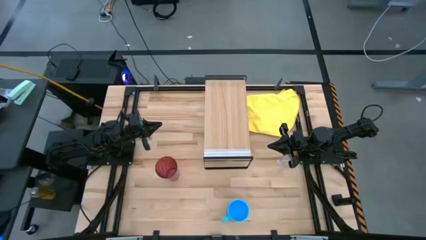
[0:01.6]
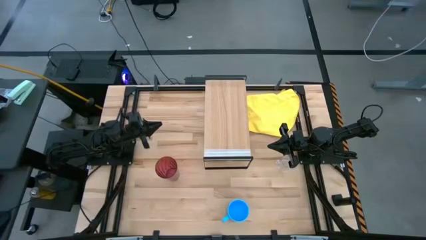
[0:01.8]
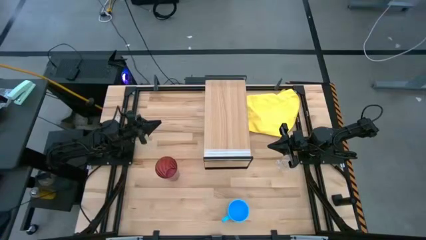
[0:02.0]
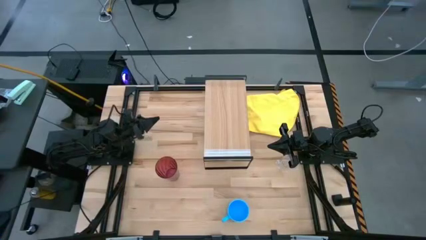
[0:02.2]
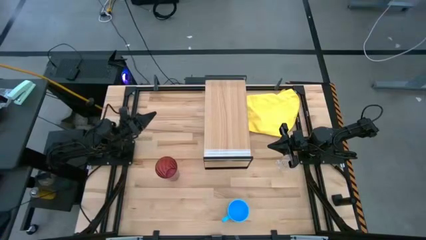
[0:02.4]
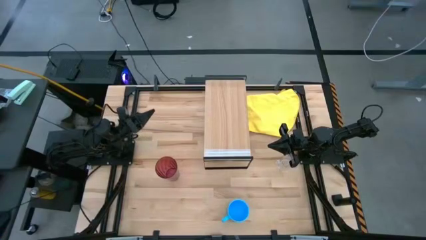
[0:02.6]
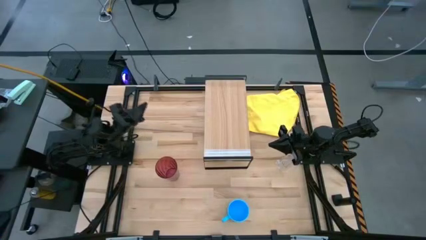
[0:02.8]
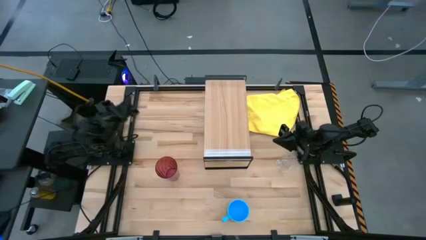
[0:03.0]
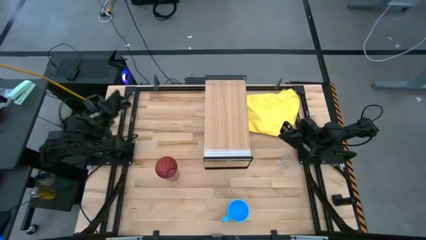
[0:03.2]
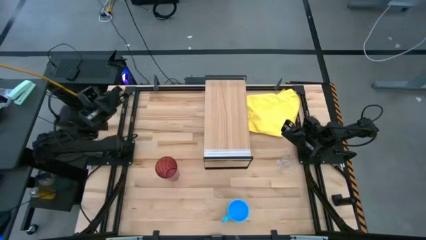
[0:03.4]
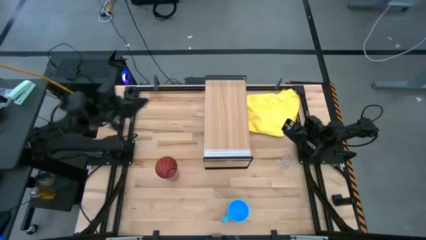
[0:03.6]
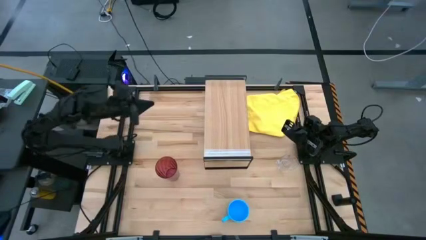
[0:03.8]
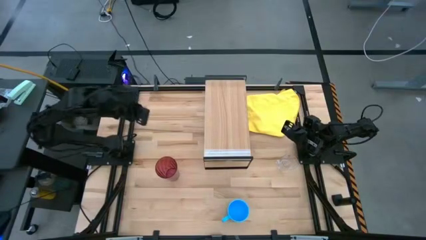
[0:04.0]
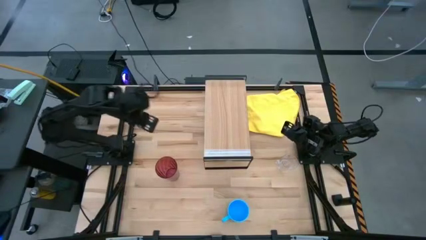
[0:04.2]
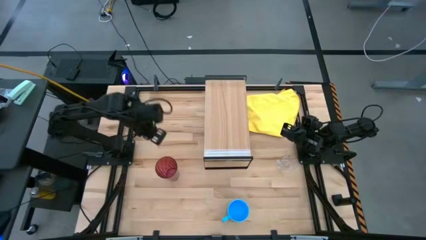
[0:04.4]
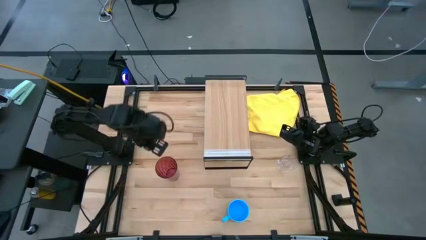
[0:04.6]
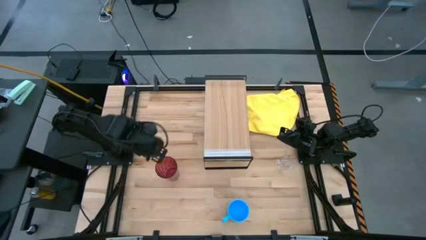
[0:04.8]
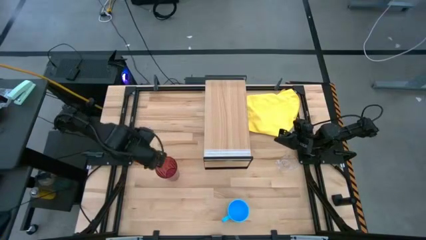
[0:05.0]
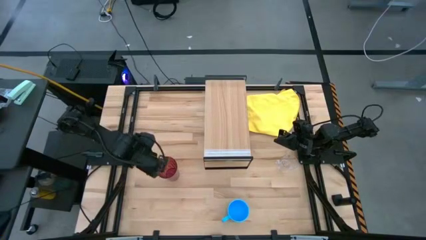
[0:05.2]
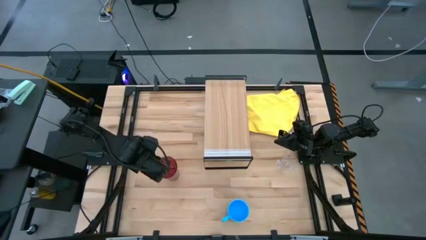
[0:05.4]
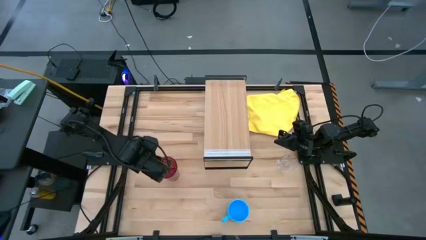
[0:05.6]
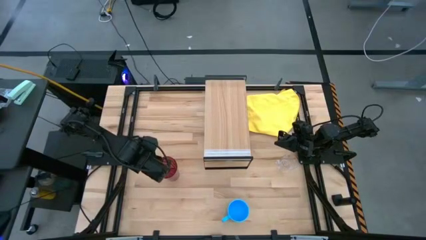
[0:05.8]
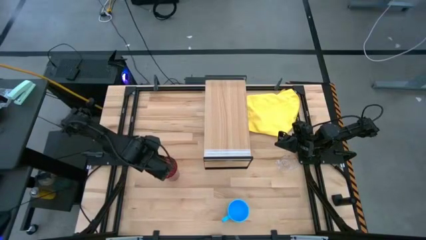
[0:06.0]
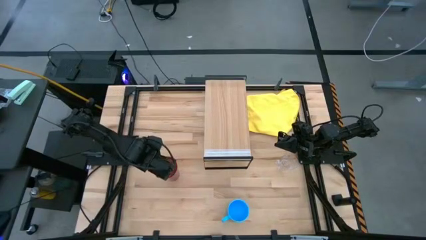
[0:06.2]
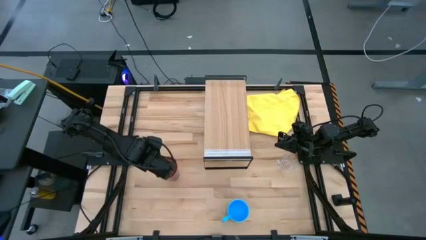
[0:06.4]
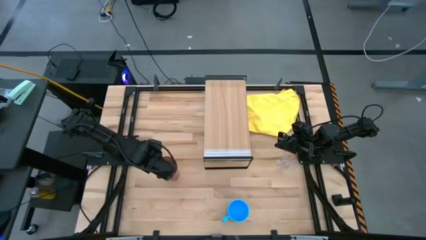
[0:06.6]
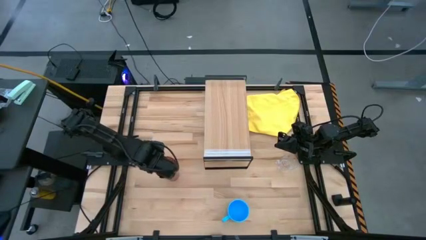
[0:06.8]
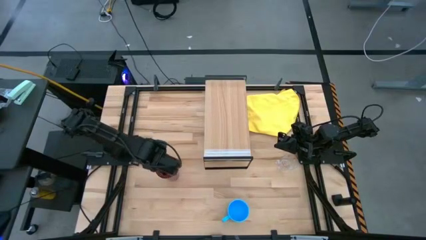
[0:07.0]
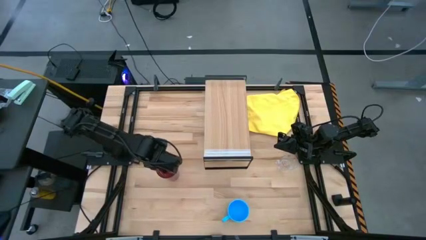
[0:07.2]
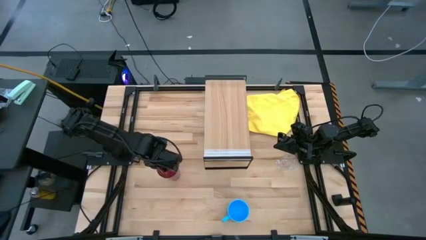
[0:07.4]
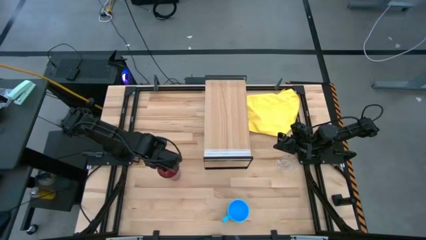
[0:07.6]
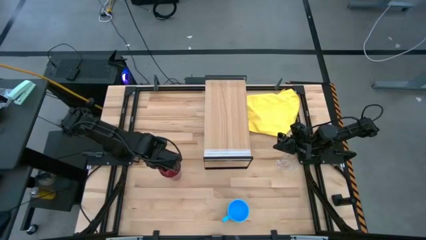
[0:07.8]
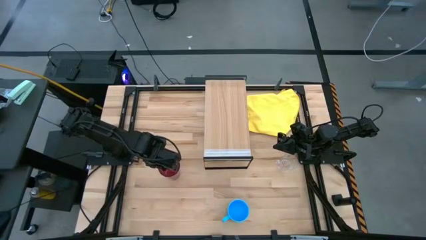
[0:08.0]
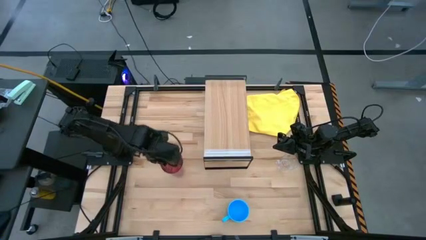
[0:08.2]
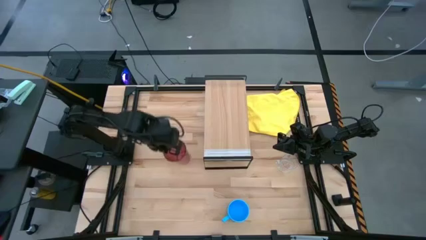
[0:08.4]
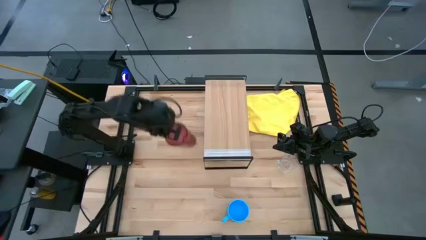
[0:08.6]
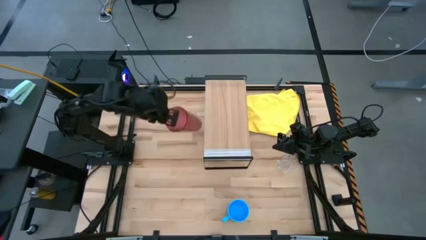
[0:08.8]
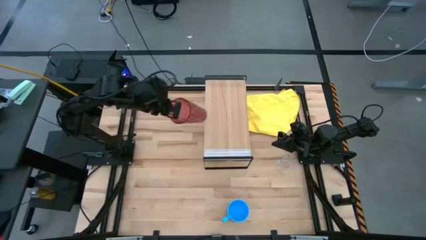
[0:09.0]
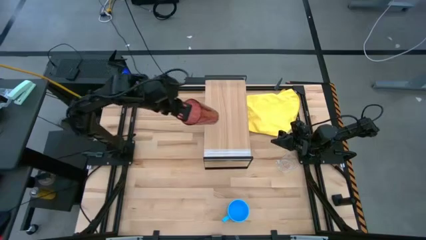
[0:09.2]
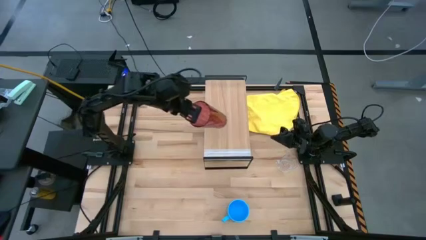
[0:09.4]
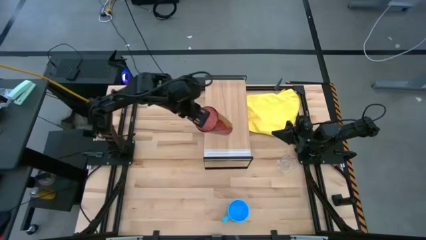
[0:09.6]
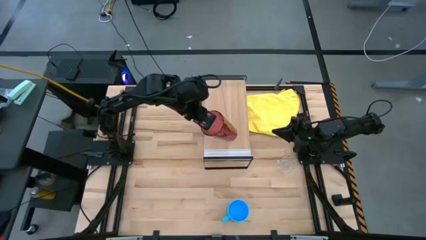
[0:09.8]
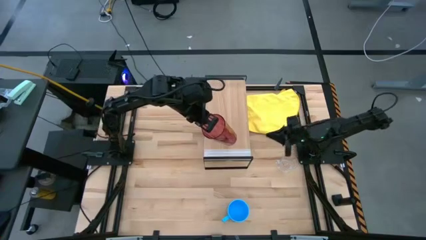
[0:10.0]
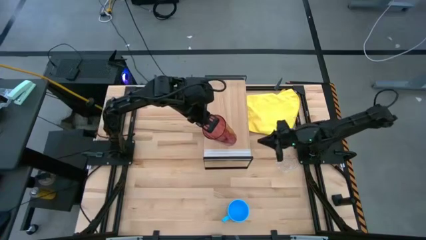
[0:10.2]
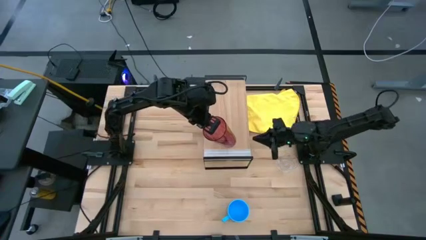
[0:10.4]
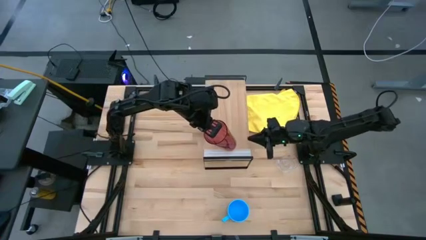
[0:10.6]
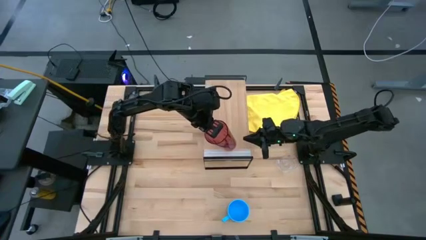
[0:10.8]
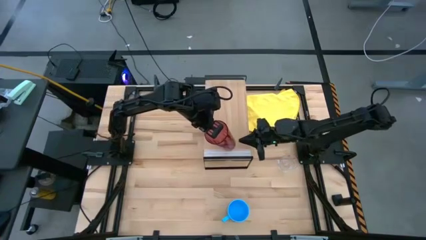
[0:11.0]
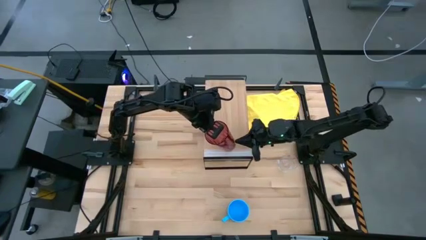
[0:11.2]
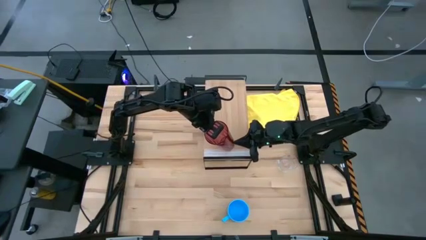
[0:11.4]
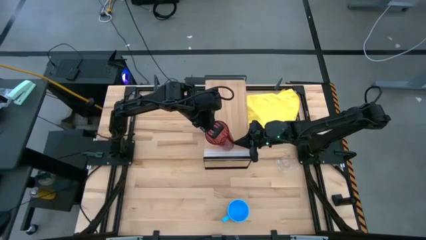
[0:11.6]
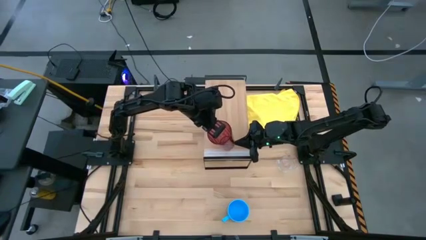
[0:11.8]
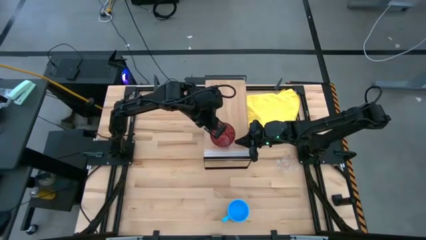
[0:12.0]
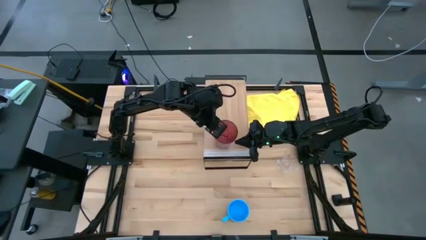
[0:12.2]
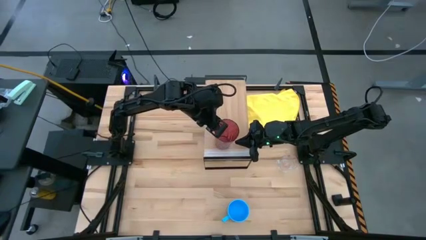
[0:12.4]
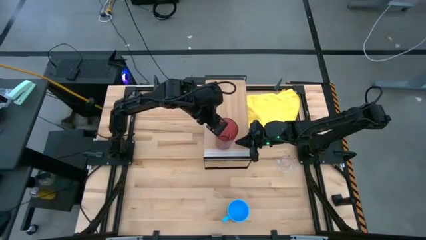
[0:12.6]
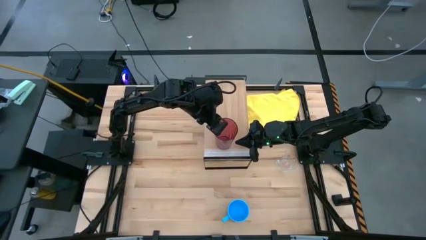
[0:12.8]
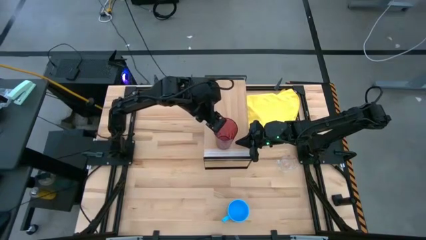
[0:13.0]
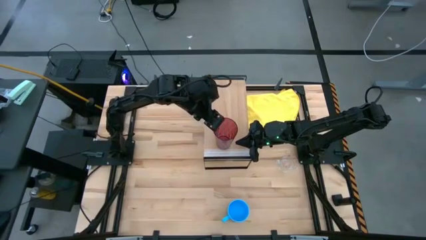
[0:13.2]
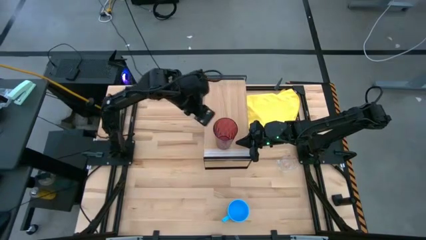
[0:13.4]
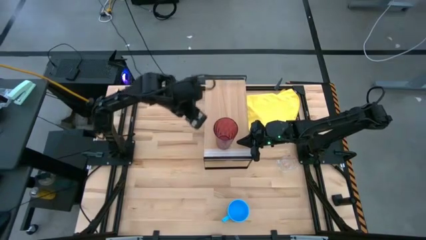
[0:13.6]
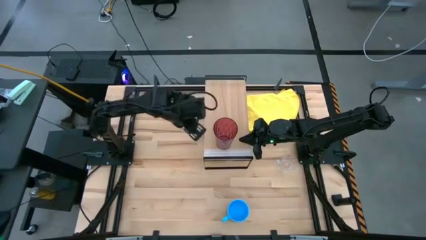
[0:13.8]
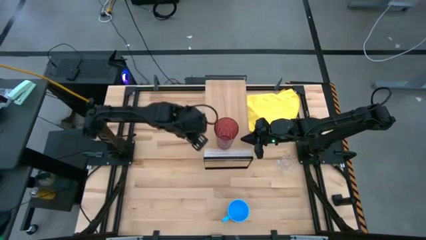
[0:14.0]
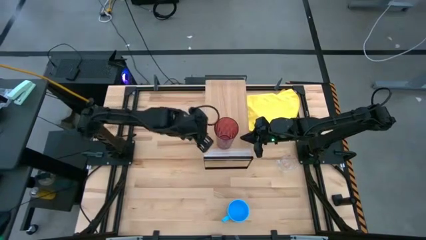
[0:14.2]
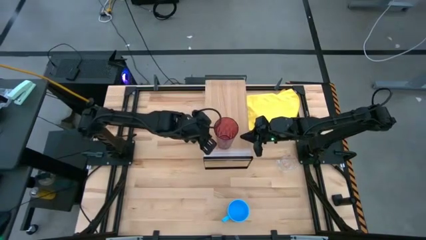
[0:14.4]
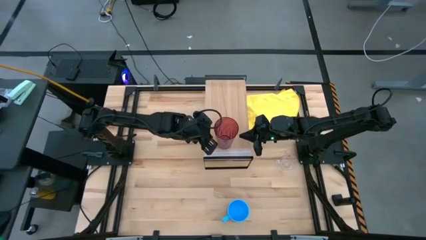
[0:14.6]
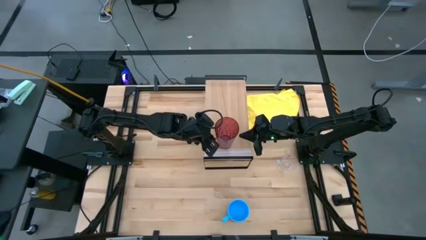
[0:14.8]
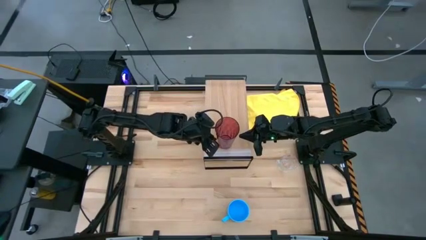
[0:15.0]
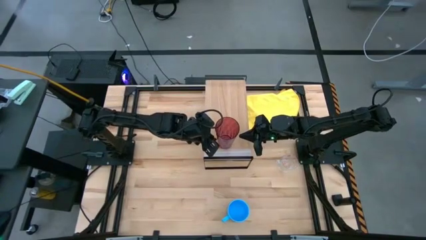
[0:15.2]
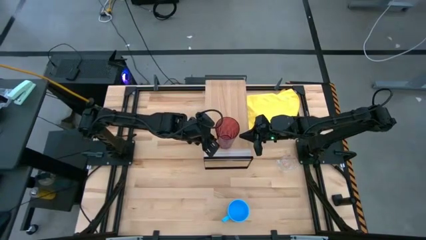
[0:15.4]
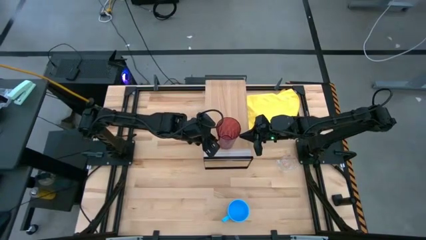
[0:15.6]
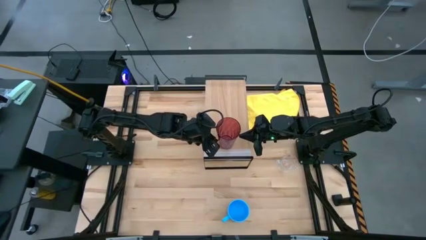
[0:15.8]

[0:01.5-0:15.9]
Task: Stack small to large cups/mugs on shelf
Put the red cup on the shelf

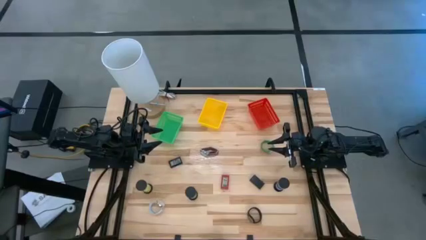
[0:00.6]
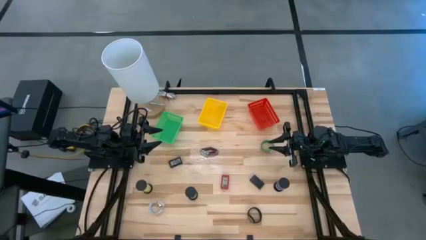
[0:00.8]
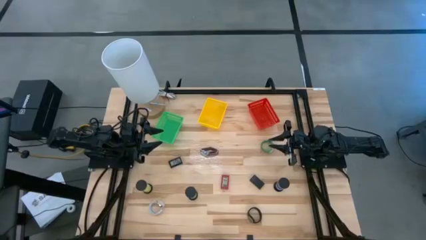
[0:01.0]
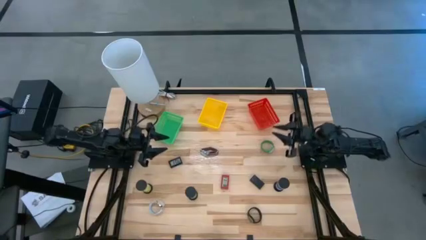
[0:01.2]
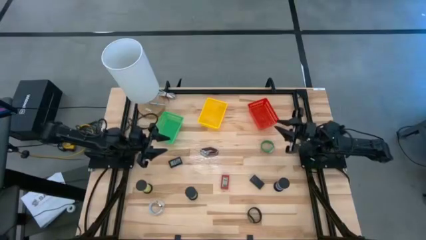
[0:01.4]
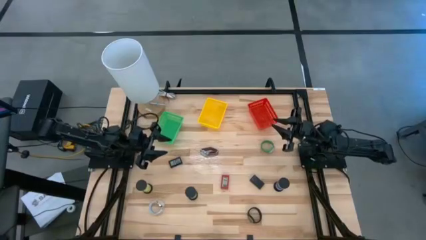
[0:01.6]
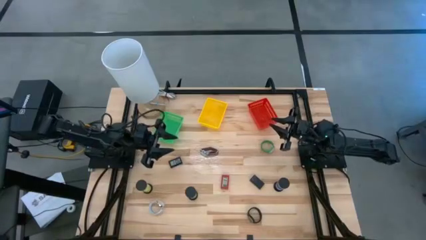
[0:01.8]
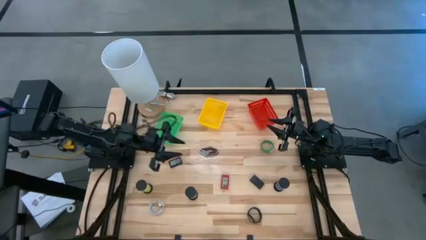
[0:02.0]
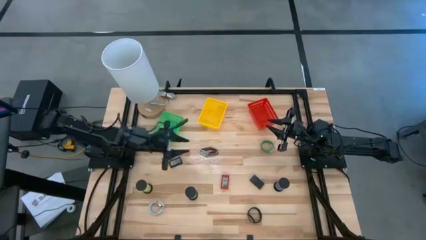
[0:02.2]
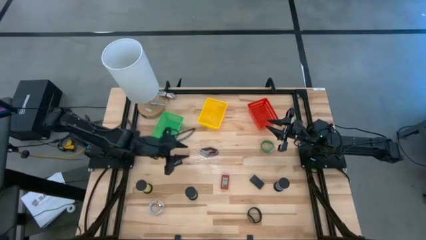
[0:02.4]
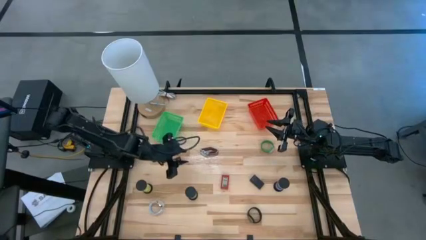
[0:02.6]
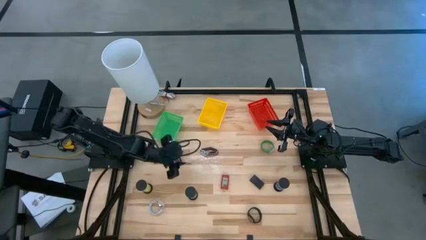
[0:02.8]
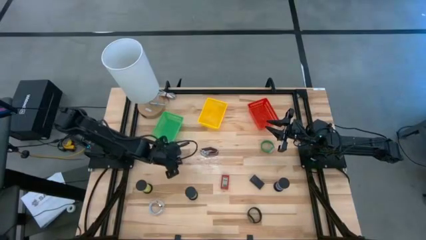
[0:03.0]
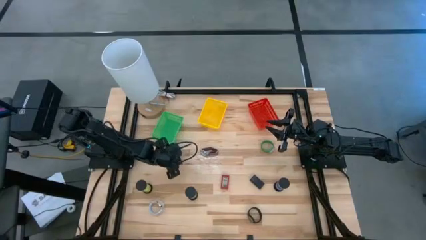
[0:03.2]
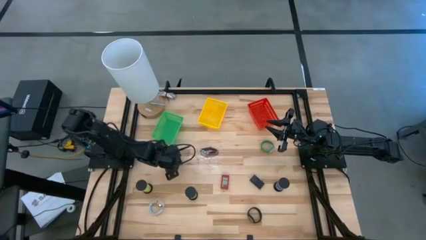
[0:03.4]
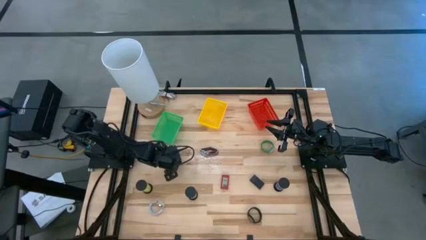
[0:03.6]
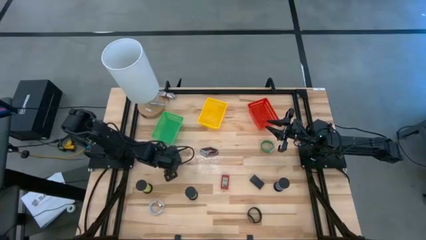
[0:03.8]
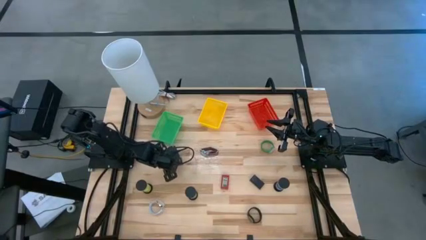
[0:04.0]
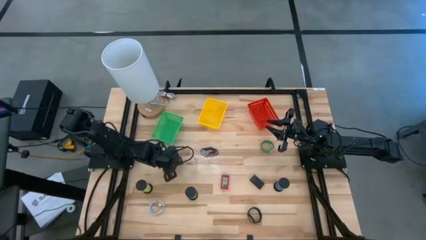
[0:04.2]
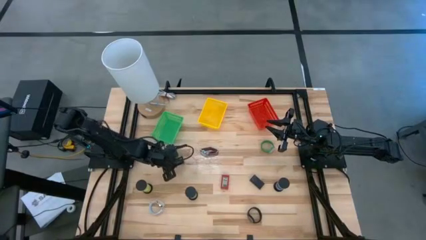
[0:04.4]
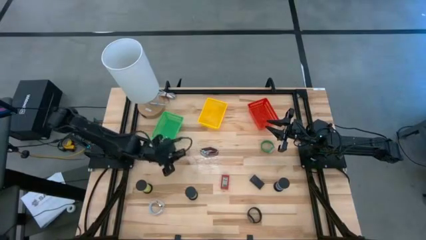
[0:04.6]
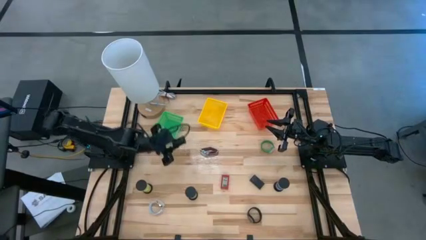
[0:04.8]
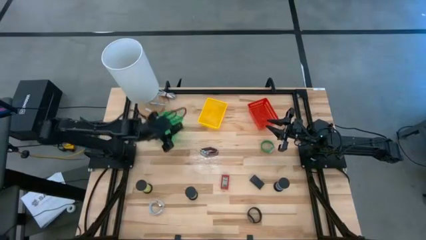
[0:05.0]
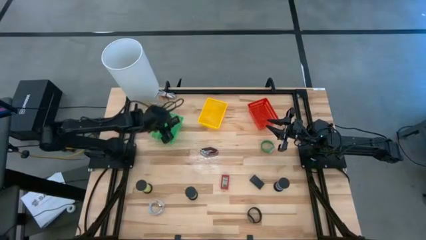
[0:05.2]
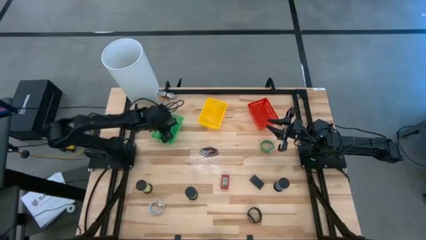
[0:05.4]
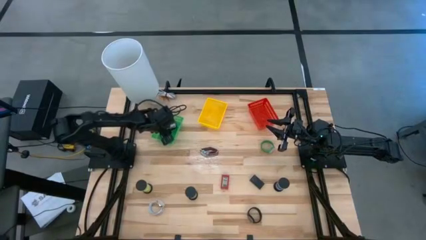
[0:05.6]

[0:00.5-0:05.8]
Task: Pick & Place Office items
Put the left black timer into the green bin
